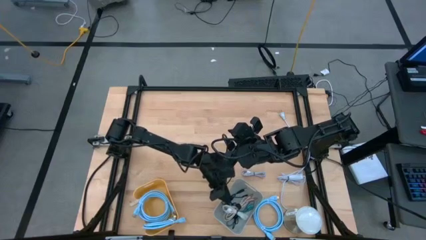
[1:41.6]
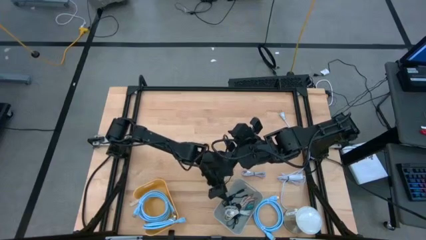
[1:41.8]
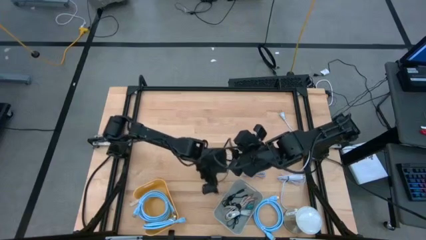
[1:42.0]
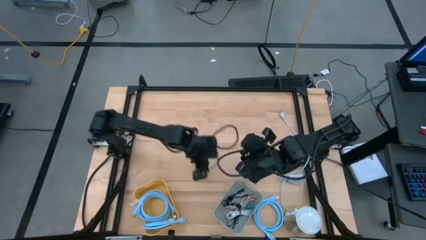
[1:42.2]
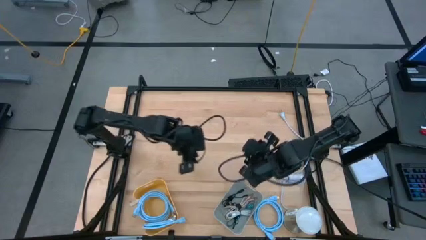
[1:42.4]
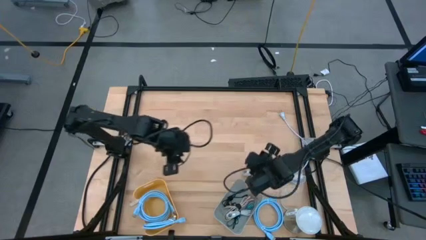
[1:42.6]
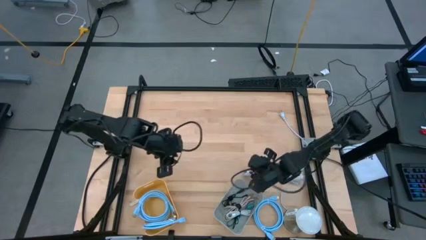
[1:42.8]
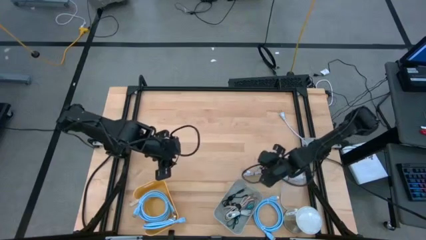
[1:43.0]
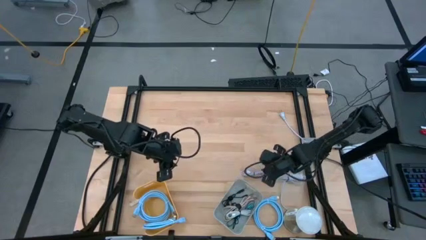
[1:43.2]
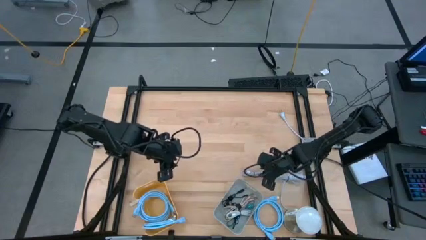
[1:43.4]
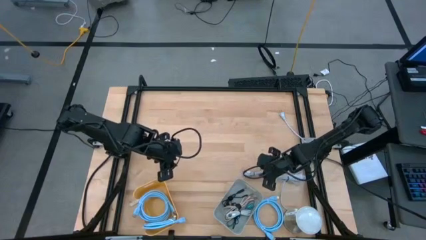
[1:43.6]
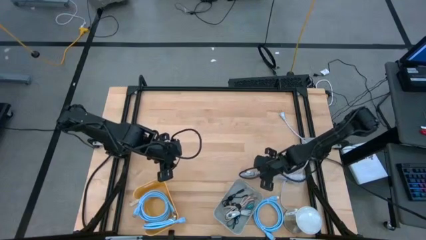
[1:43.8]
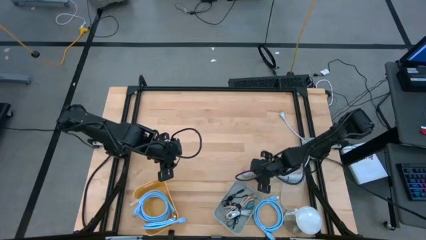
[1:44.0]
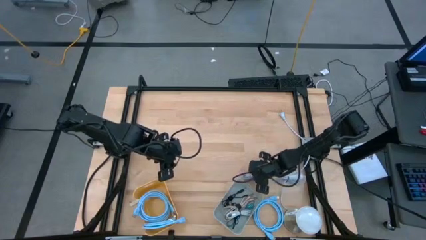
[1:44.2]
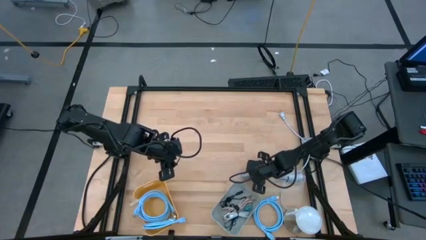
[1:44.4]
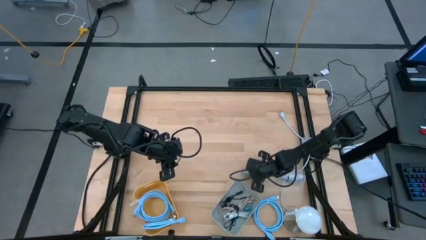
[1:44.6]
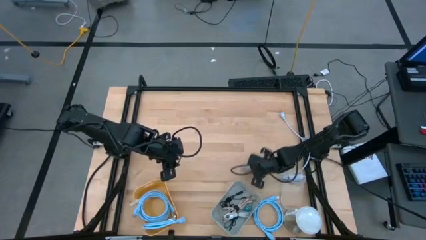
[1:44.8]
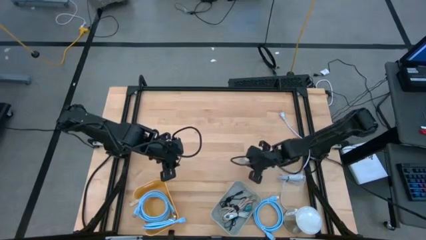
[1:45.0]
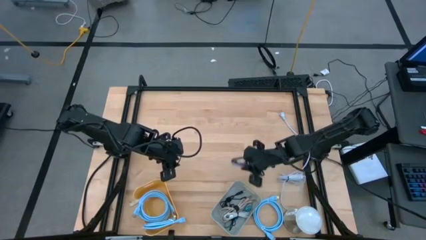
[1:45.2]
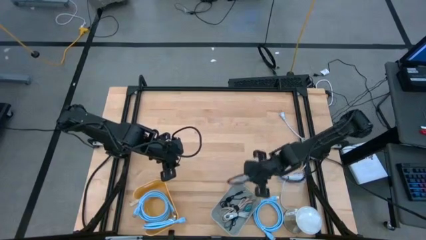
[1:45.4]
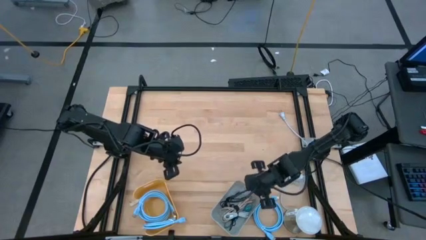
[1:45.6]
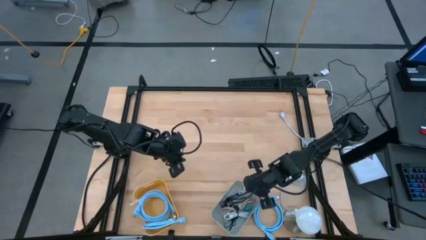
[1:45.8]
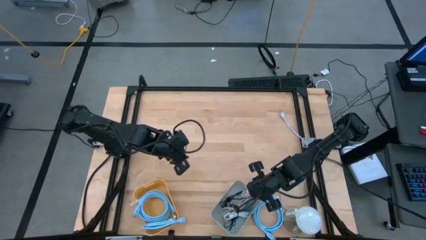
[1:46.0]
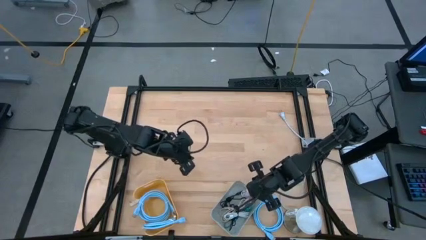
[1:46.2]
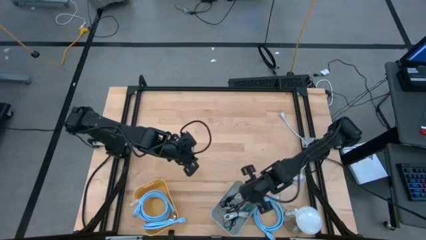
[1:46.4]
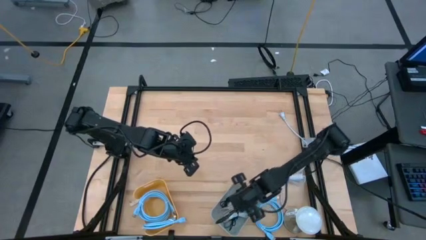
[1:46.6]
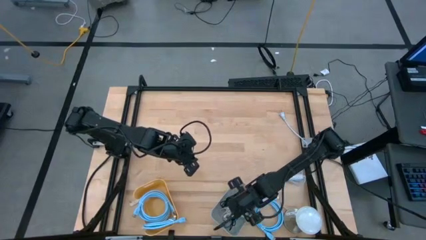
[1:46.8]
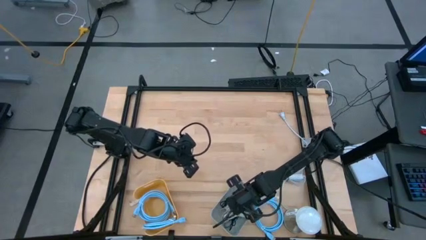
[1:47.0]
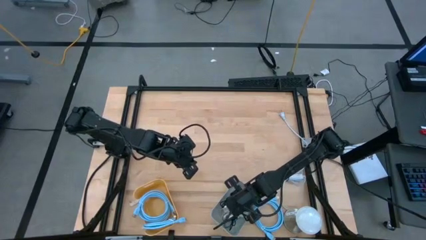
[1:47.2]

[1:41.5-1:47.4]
Task: Sort cables
Put the purple charger cable into the gray bin

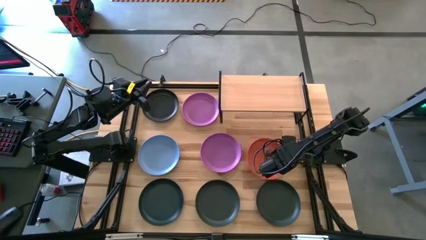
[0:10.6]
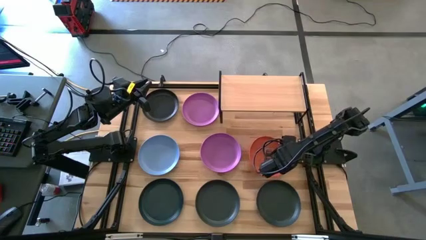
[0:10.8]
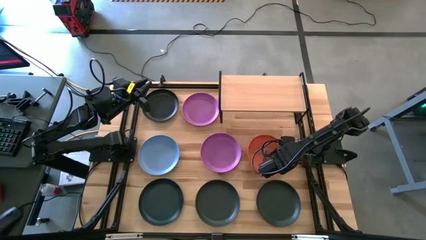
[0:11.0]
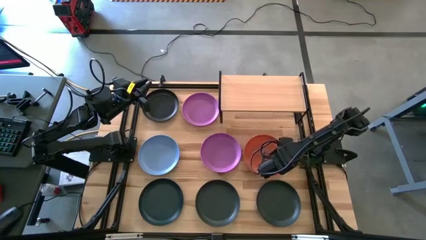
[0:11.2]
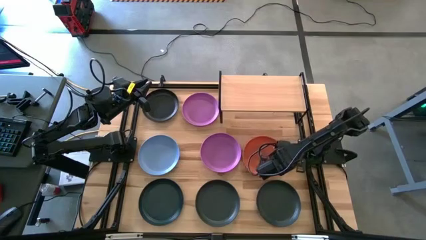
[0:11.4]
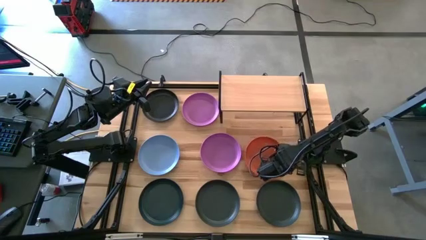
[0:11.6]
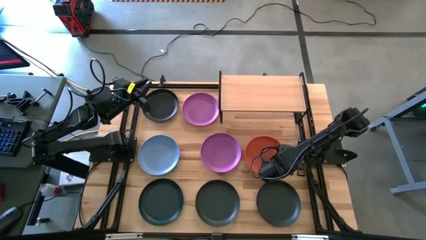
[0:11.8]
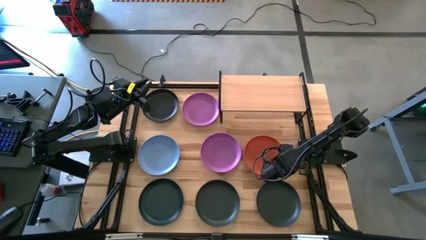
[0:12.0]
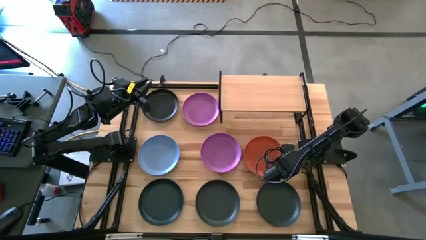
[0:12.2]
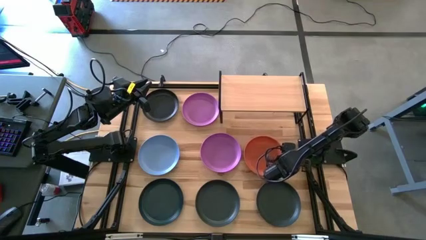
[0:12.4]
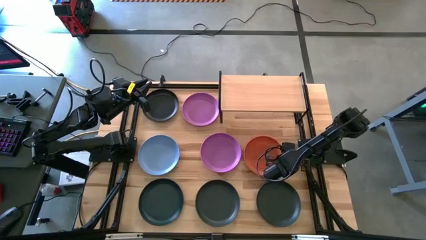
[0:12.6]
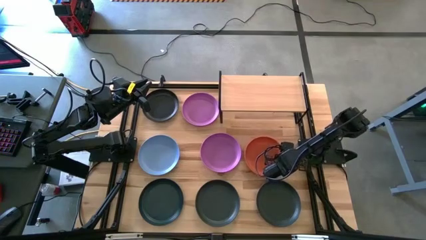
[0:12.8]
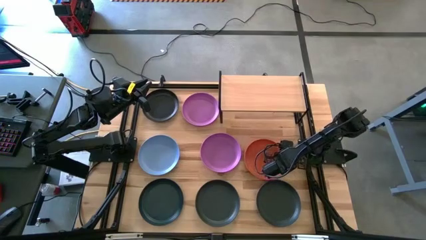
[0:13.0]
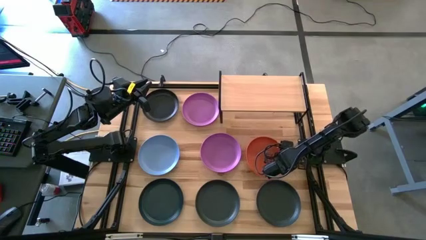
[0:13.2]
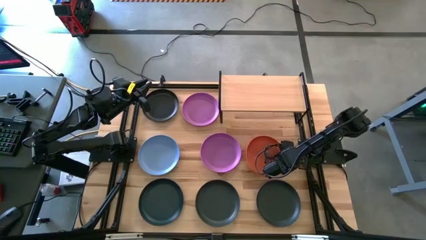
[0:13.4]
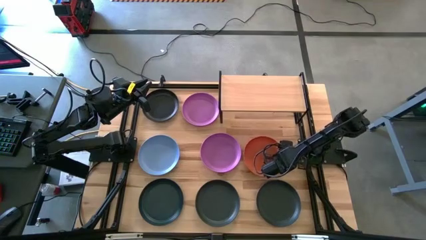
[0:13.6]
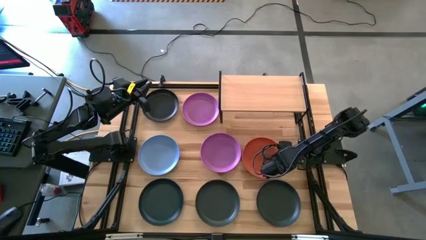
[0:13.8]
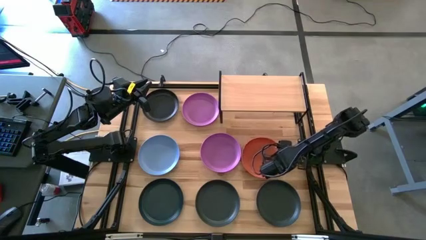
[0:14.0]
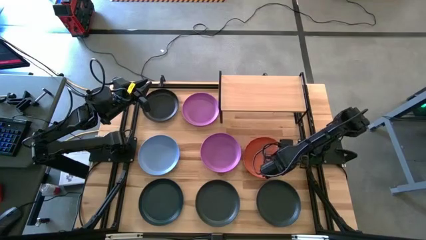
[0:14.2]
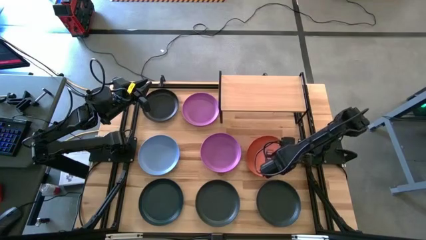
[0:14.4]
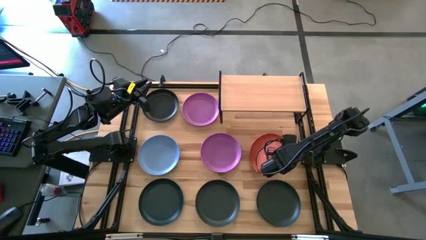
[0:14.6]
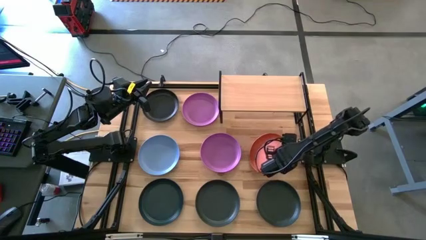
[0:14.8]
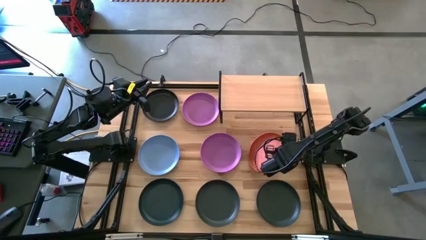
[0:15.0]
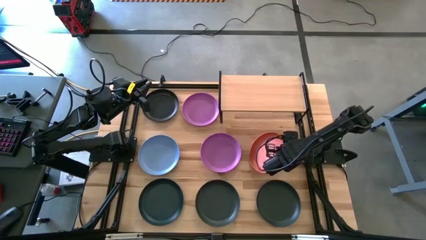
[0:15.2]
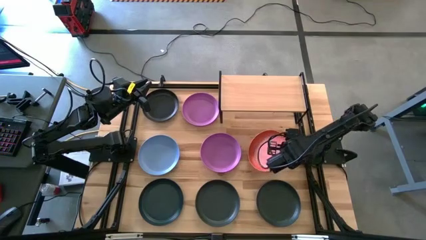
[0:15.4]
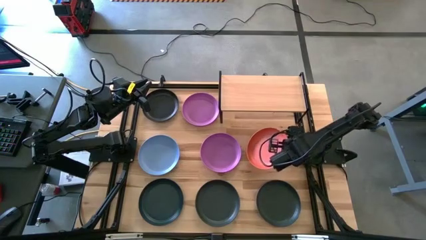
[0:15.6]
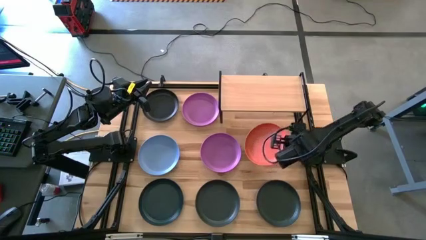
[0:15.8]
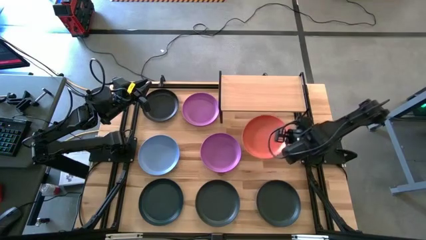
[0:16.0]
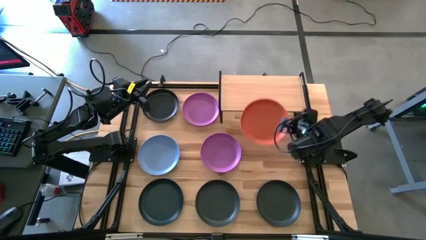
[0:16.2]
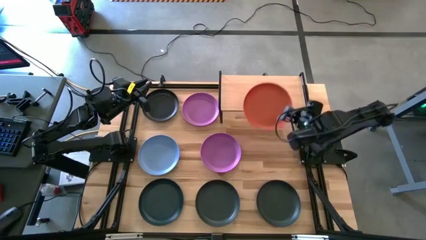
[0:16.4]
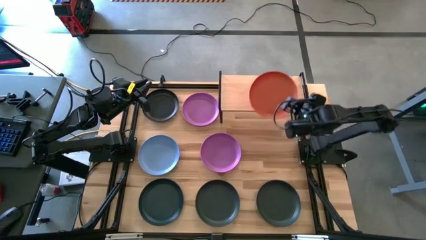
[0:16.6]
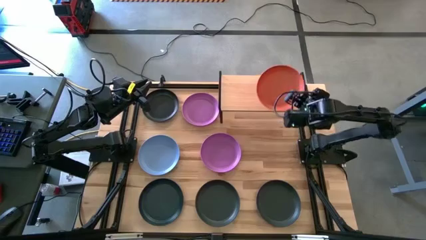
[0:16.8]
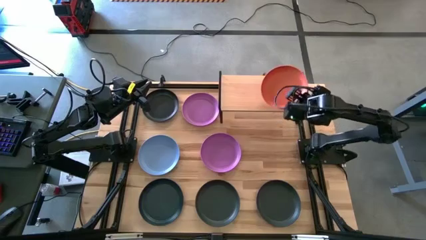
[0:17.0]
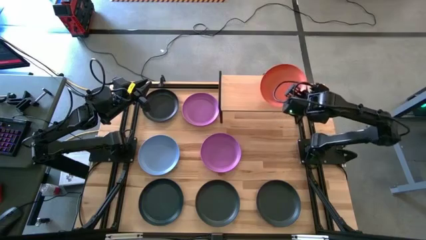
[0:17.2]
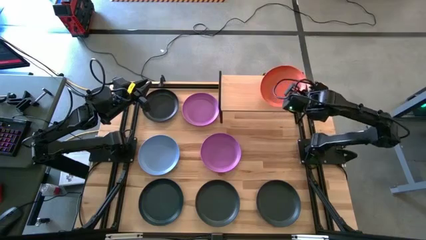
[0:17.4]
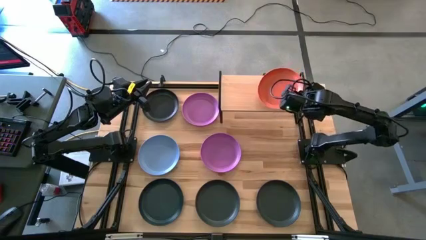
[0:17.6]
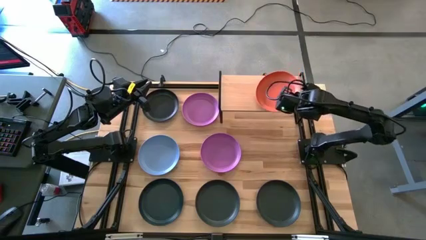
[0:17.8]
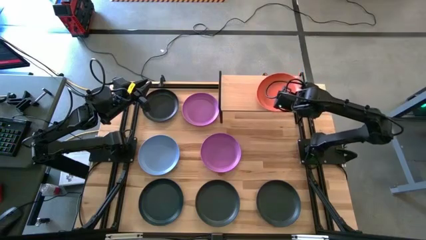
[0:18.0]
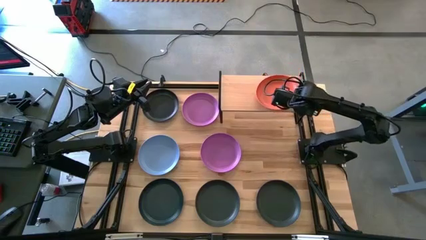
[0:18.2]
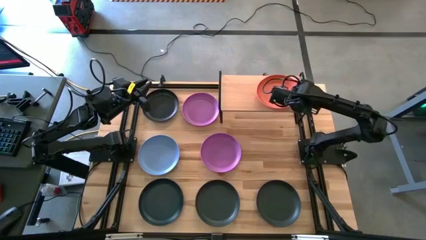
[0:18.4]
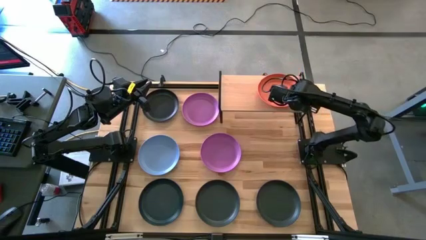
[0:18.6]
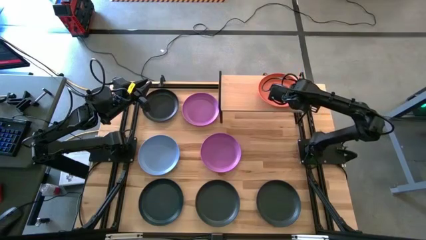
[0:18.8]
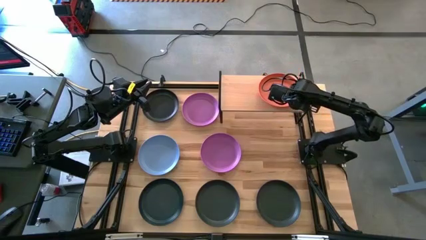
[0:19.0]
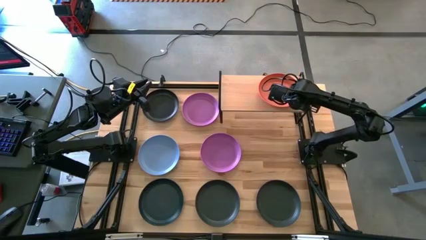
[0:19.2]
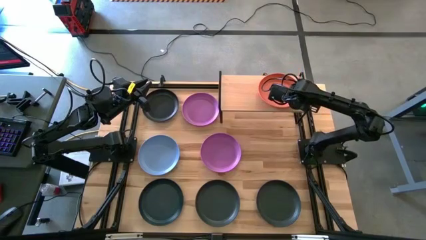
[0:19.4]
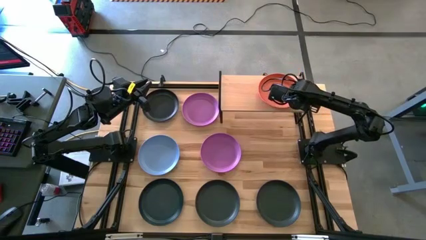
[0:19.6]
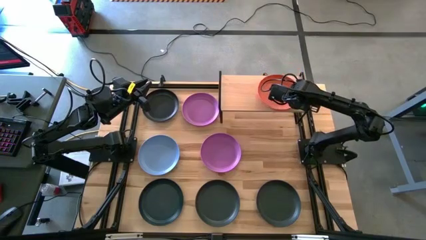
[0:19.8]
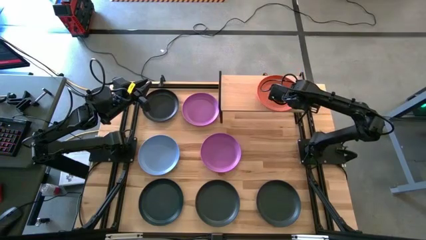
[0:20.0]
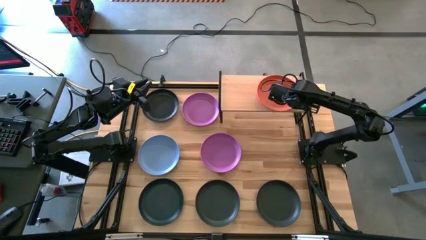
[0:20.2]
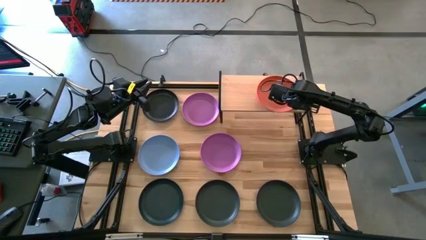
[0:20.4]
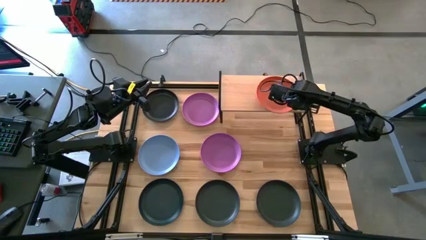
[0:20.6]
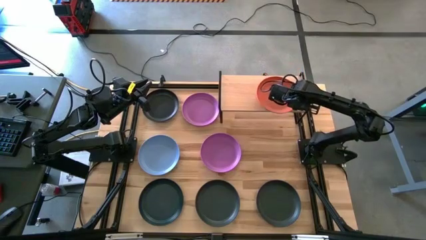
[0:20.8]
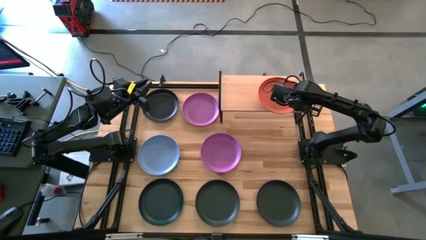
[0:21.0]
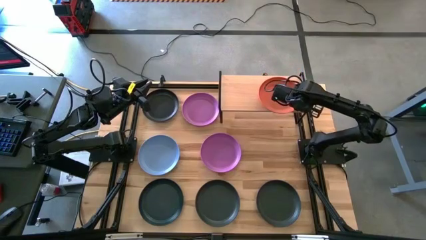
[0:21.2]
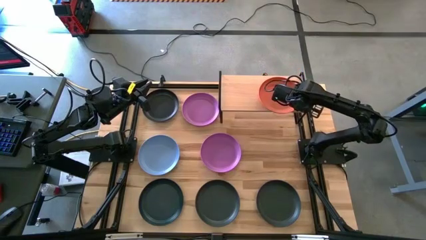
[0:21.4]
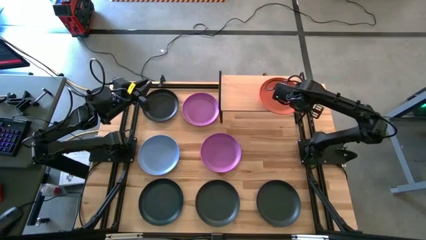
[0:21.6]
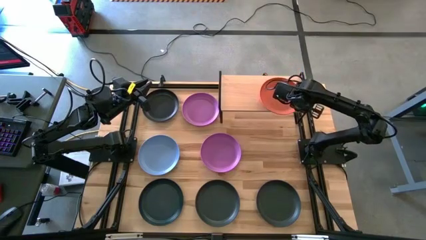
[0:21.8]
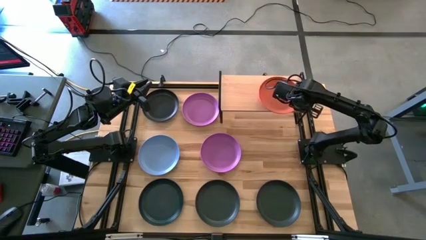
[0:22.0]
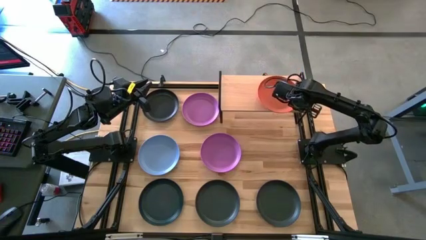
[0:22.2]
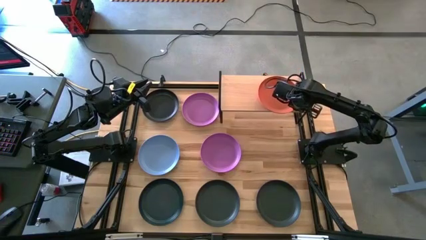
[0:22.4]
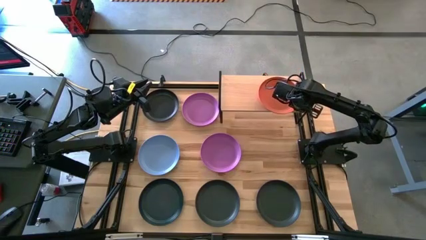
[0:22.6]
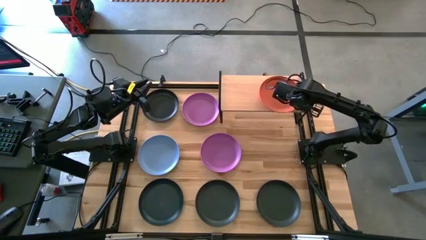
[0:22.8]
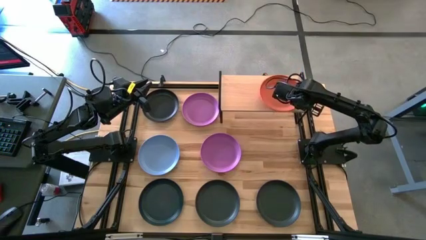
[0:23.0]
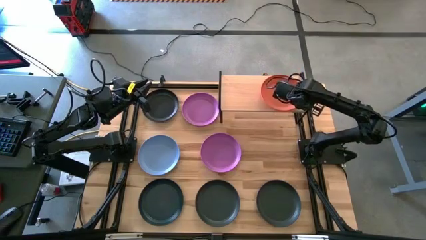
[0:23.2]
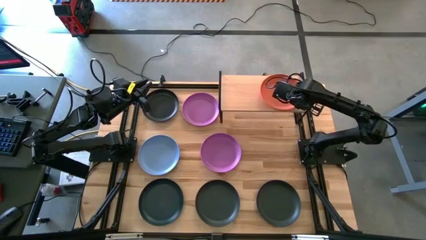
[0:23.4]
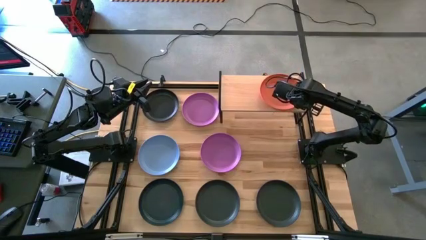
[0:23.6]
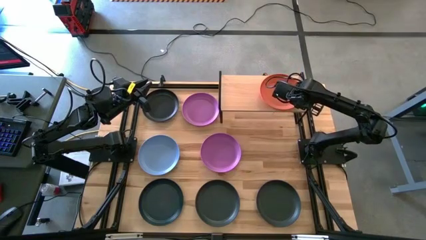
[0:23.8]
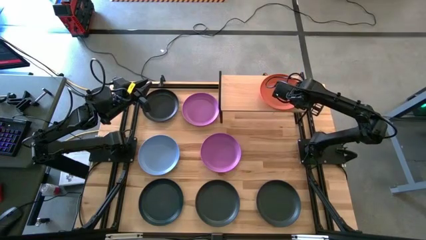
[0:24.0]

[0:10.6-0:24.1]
Task: Place and stack plates onto a shelf
Put the orange plate on the shelf
